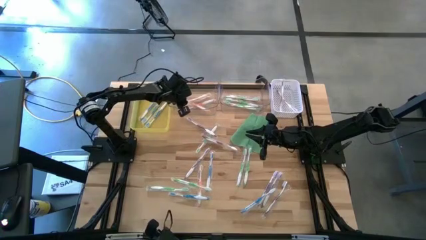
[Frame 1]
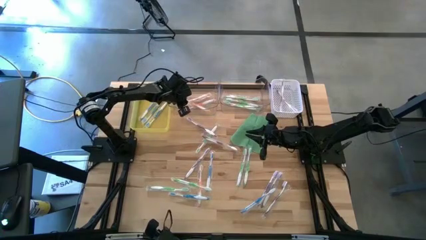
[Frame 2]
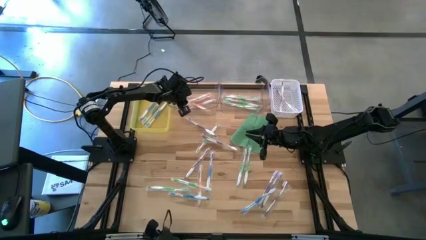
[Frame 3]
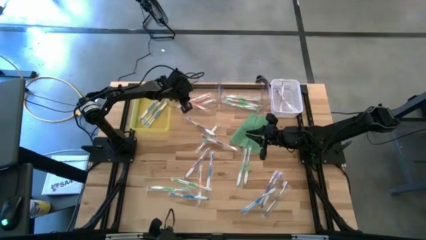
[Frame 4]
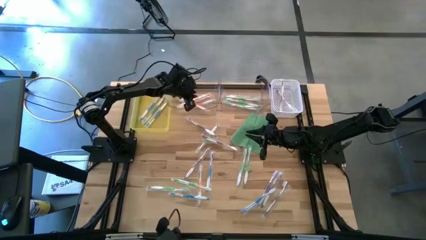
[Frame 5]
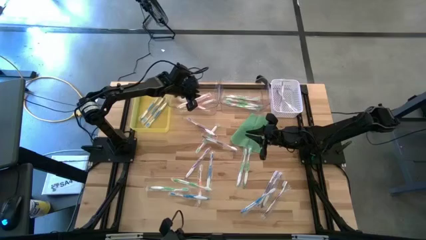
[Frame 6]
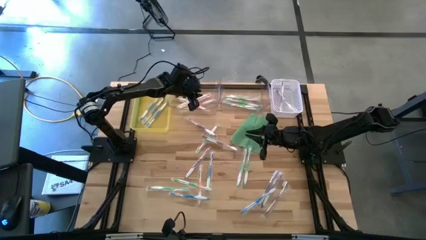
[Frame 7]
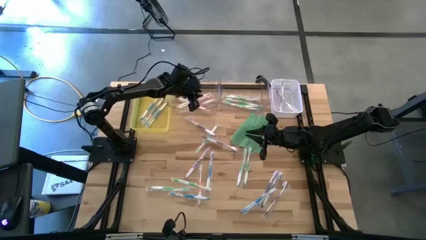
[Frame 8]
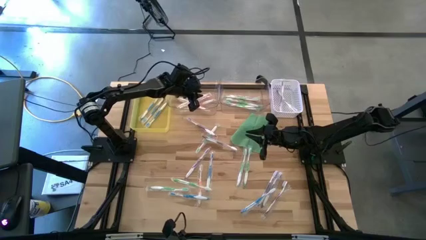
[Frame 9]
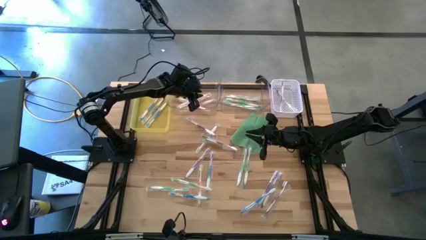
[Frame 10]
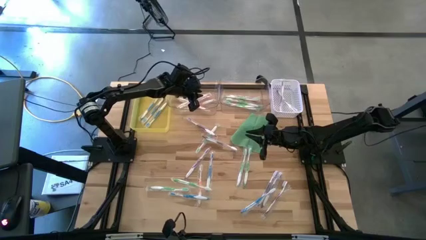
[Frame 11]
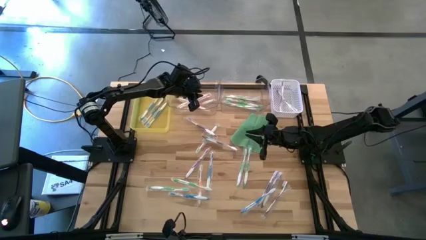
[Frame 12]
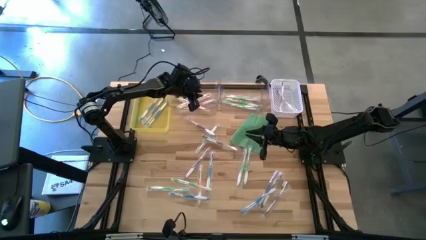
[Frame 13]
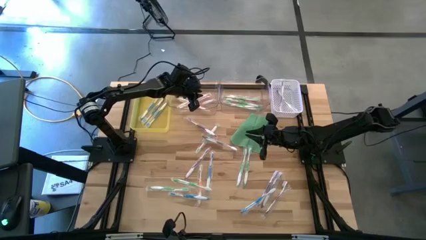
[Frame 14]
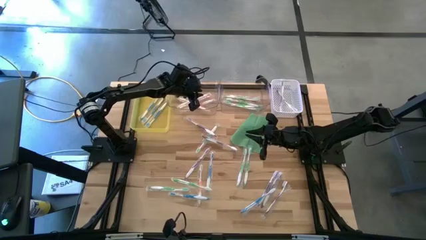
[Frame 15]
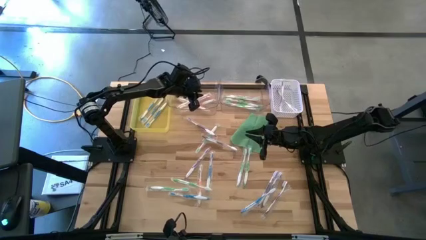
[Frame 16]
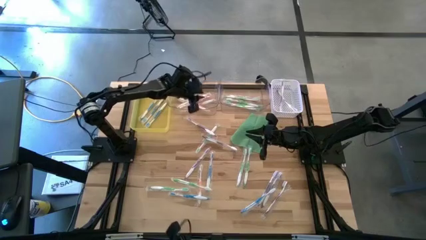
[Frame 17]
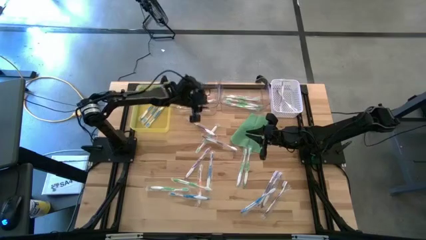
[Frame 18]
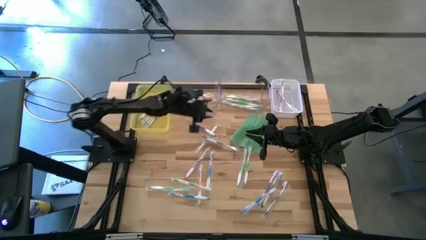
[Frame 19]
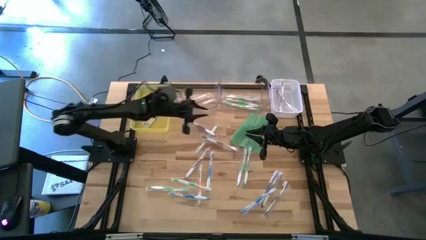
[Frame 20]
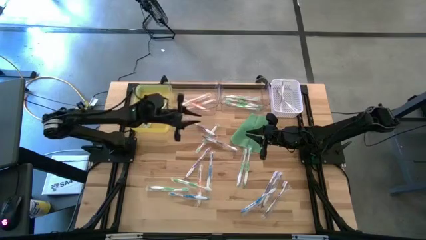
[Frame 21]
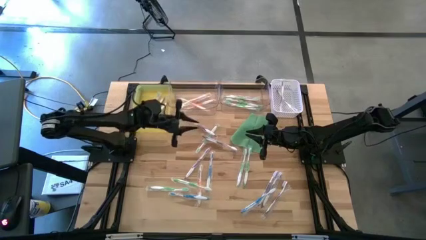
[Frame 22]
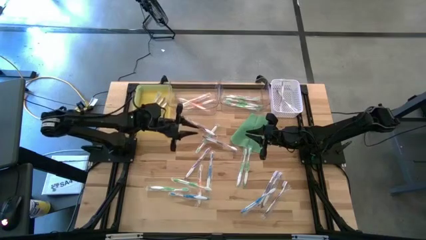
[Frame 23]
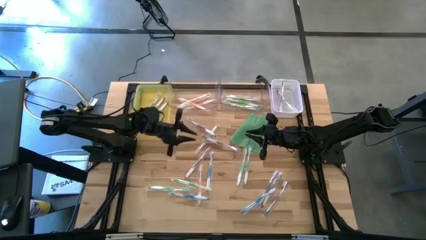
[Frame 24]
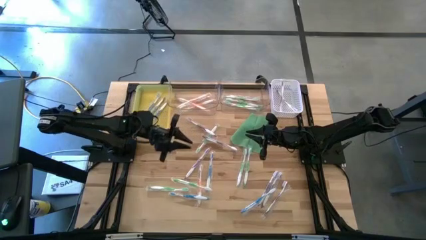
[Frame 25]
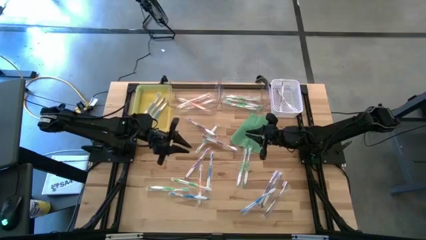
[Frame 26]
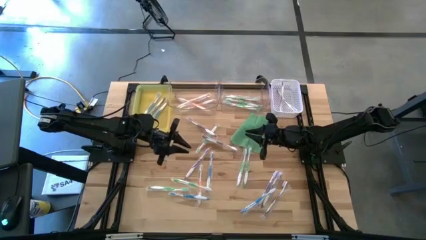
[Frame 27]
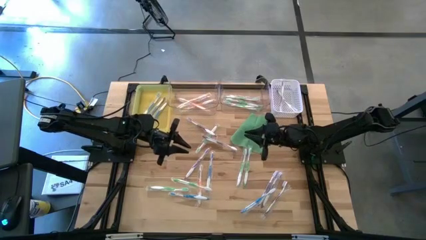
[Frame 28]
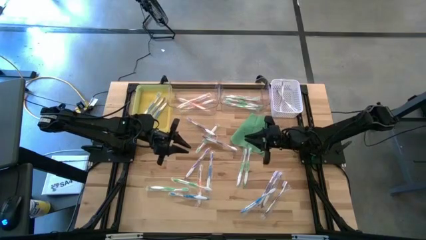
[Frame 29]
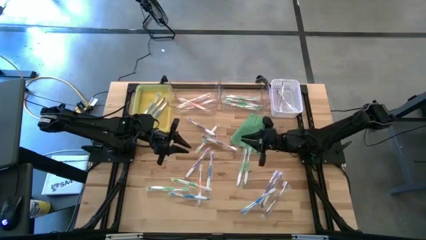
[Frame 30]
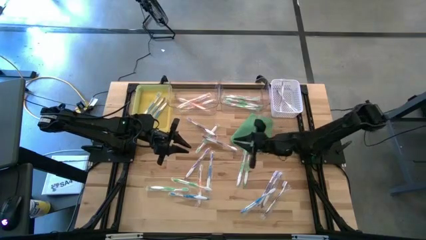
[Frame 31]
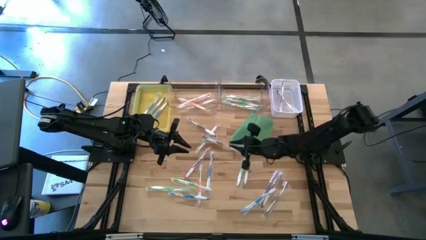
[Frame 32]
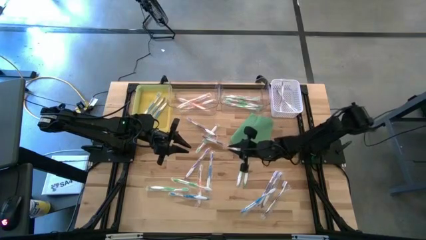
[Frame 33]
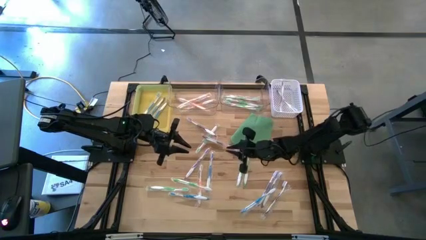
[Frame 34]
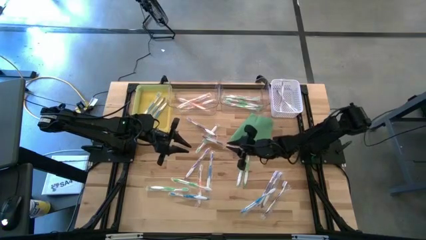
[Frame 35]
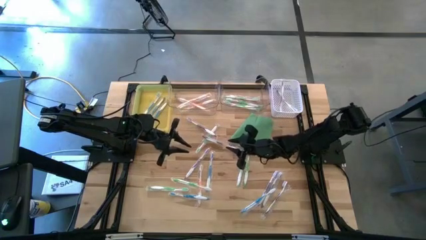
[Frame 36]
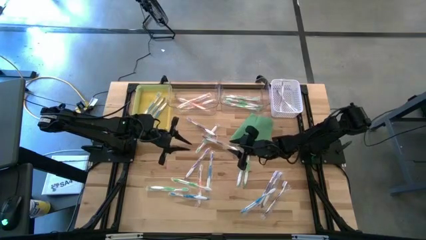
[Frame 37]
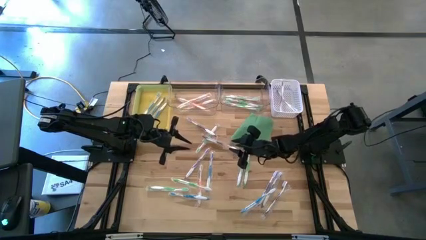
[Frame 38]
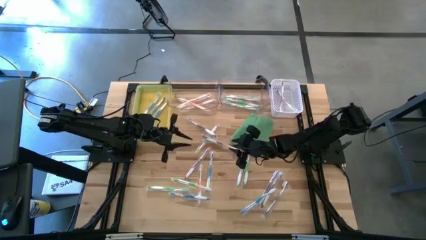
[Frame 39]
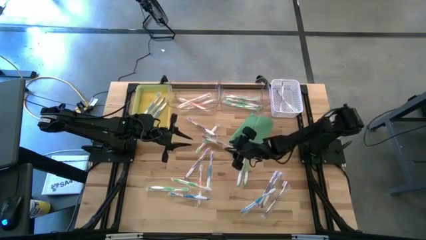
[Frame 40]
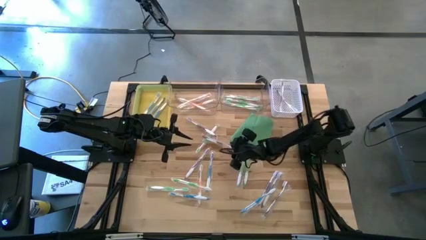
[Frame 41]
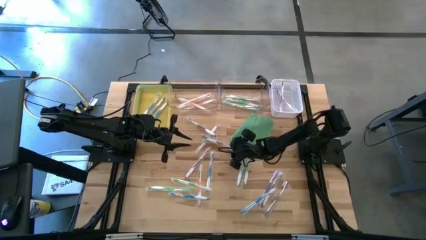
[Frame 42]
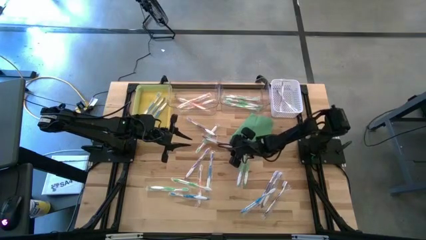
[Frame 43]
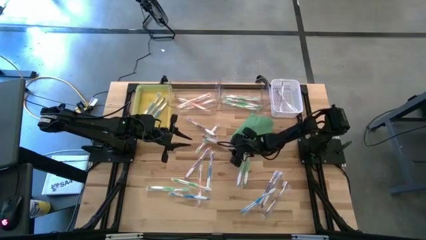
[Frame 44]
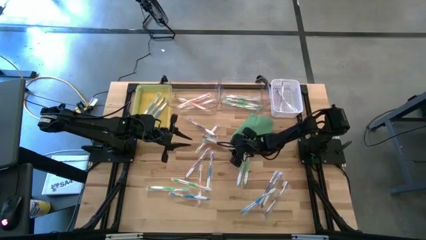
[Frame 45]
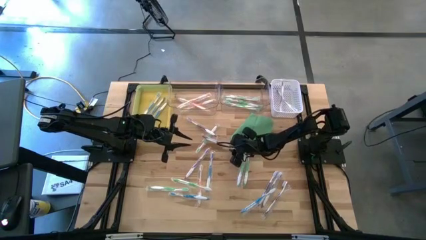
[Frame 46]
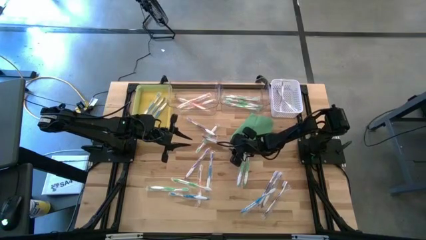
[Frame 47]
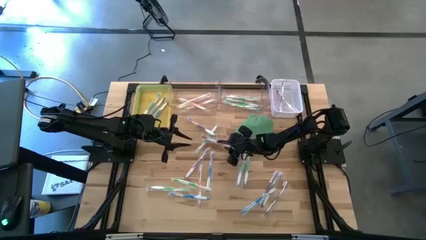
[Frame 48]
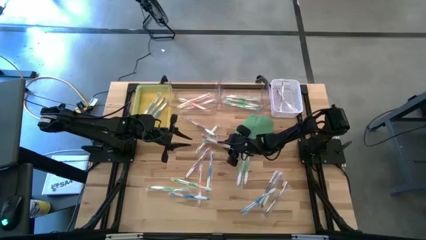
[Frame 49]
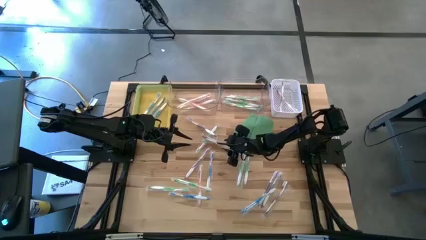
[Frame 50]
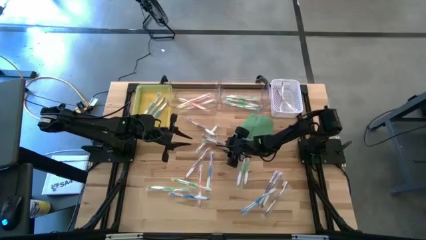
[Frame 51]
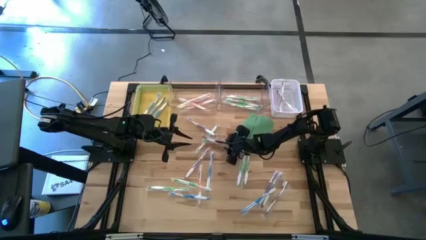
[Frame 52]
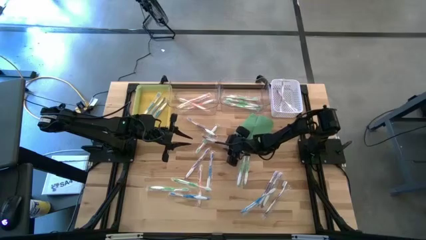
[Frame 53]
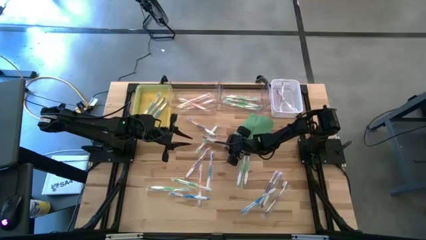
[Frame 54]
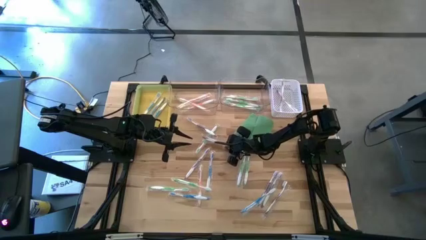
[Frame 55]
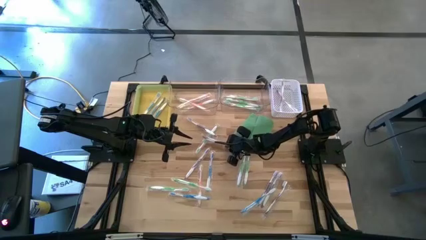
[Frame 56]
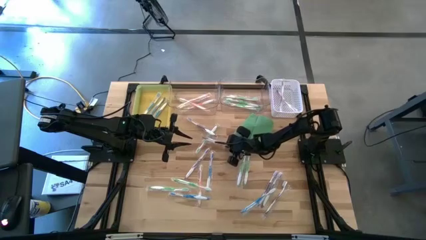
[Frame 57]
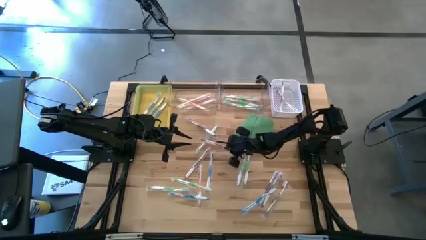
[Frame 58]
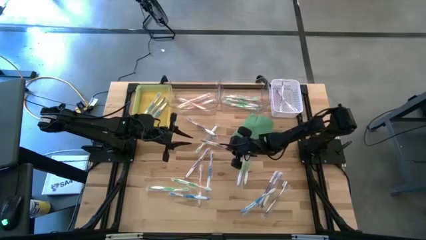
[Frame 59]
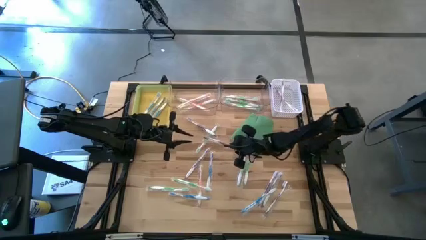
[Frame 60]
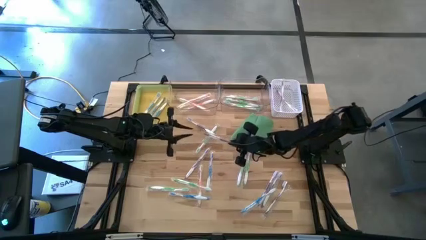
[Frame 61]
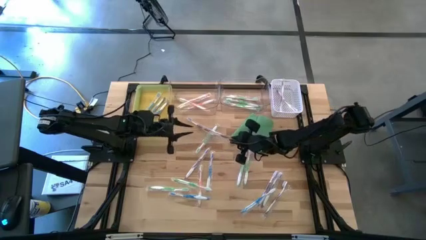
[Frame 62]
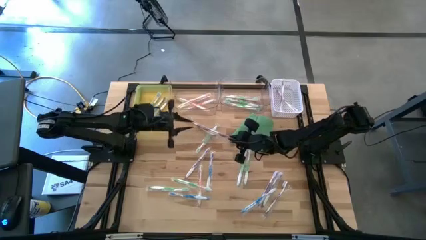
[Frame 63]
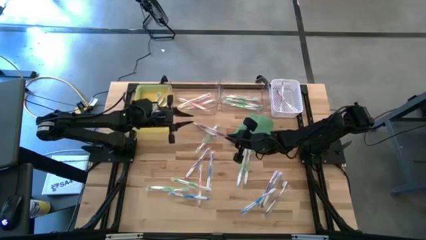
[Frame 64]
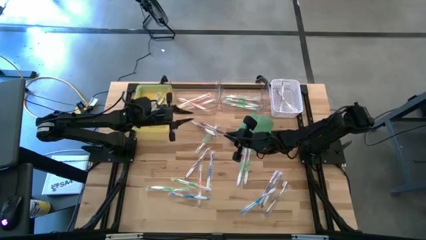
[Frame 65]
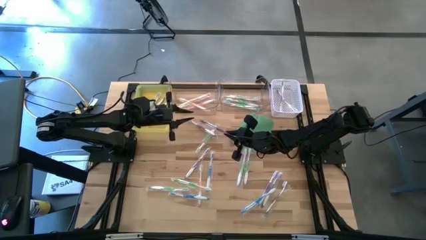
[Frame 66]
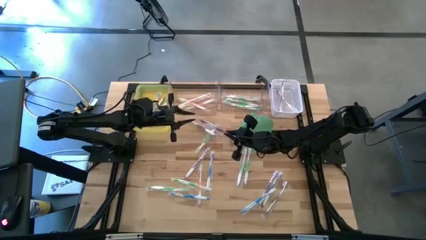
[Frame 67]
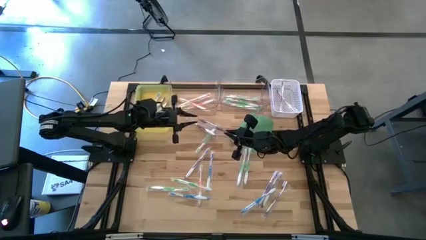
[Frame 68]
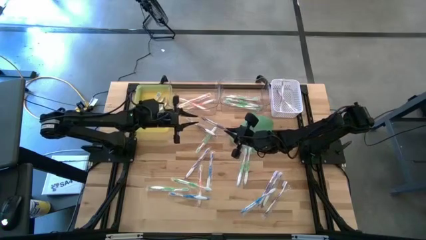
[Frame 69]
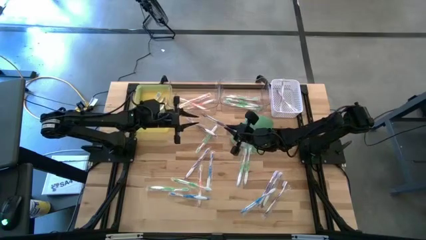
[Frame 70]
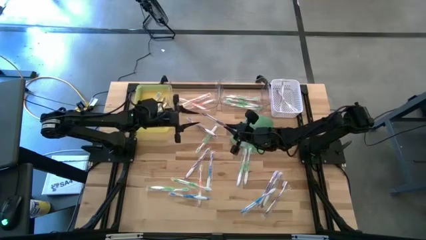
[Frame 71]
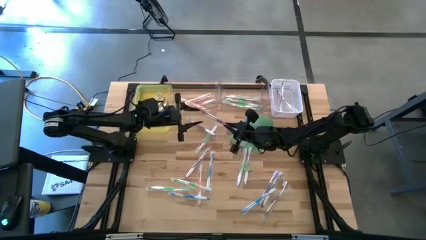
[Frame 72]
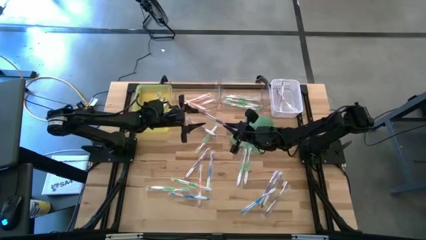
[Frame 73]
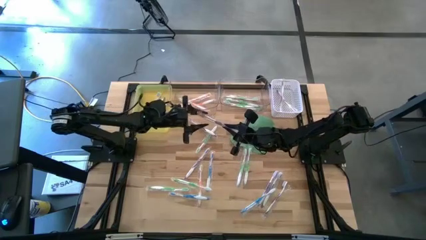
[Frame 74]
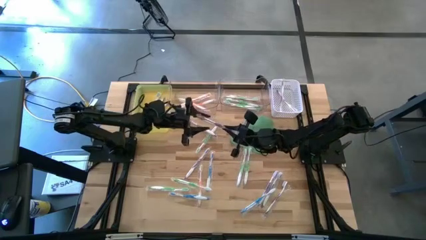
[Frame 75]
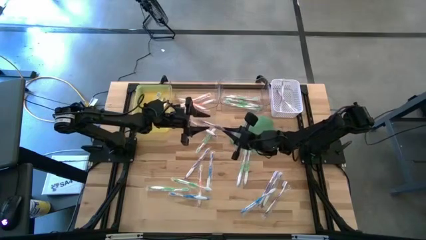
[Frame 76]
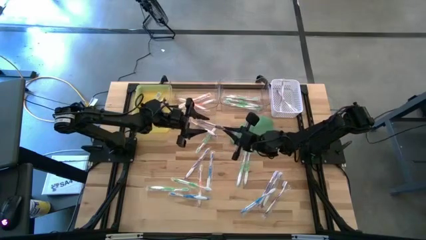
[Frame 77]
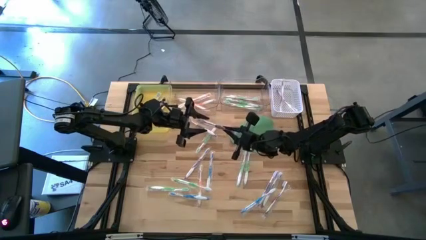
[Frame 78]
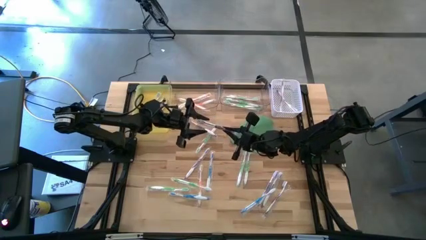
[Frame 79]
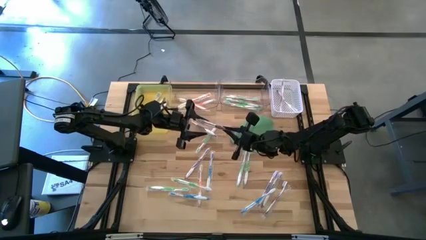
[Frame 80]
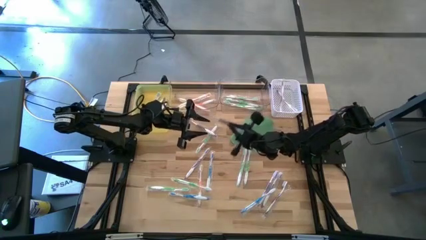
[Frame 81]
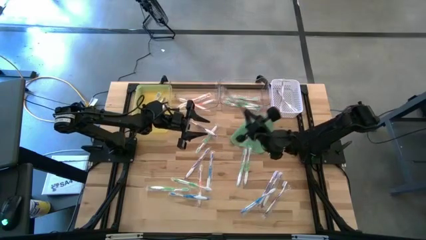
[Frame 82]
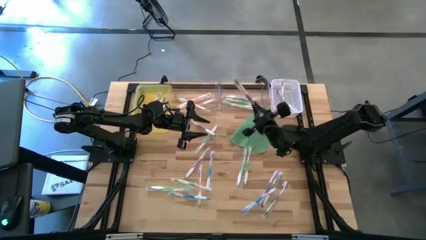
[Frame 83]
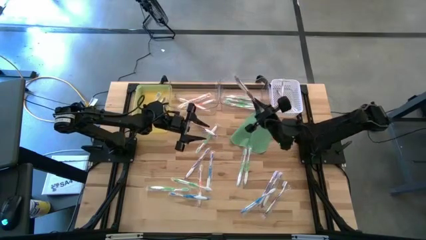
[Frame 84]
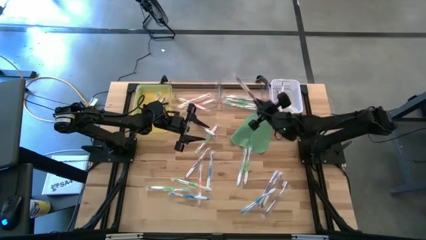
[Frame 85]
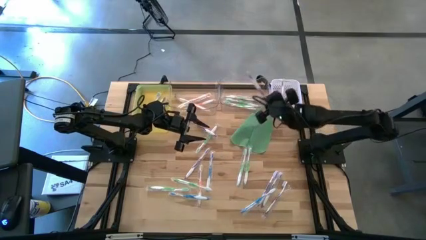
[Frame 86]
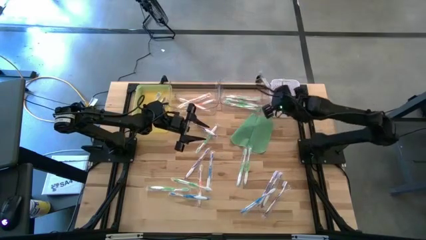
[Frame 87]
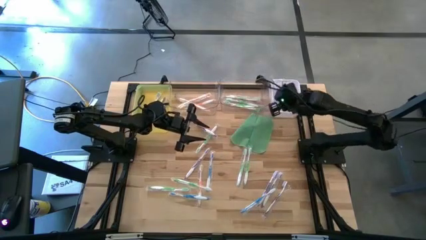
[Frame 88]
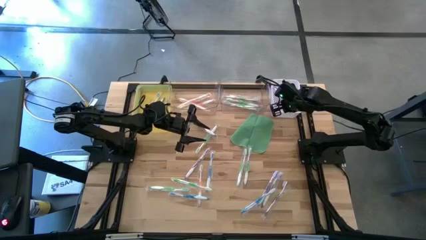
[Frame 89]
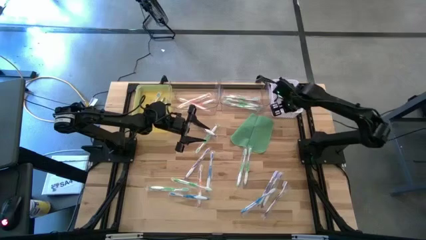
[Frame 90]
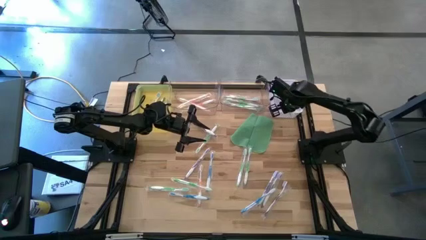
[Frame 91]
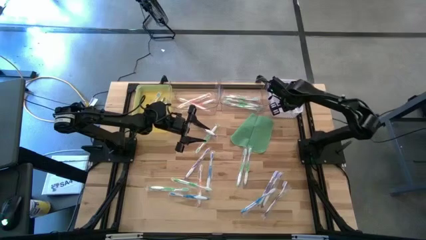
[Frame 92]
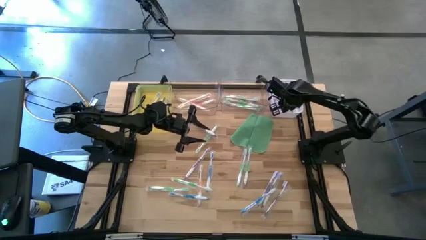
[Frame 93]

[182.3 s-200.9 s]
Task: Pick & Place Toothbrushes
Put the purple toothbrush into the white bin
